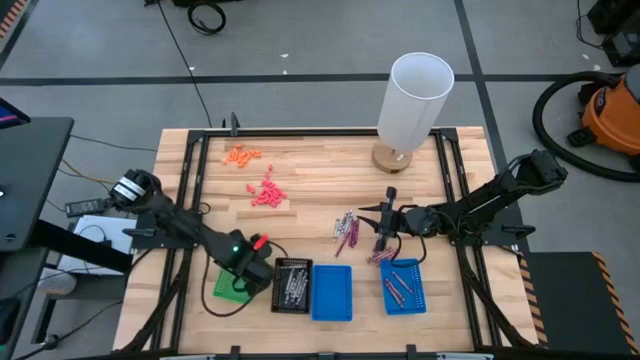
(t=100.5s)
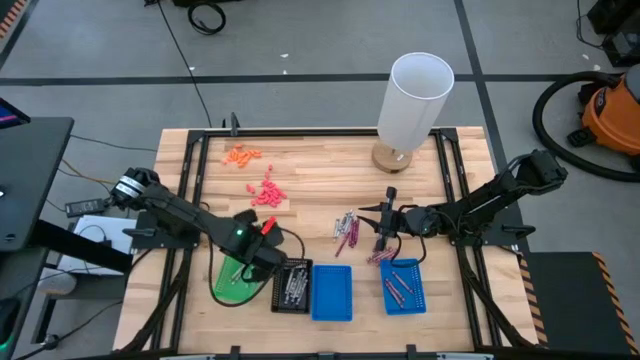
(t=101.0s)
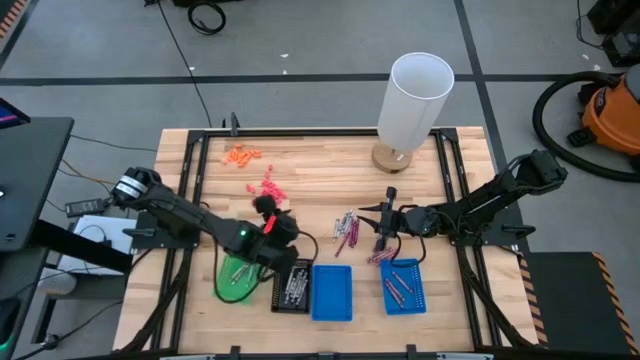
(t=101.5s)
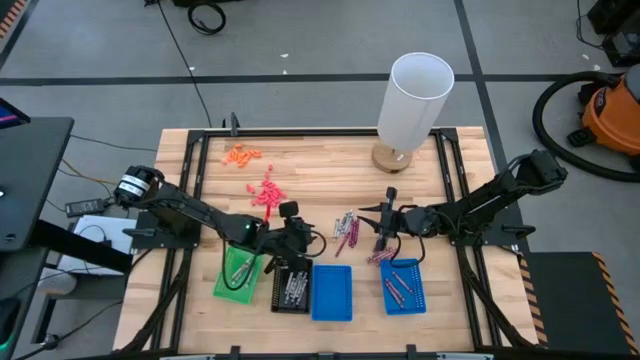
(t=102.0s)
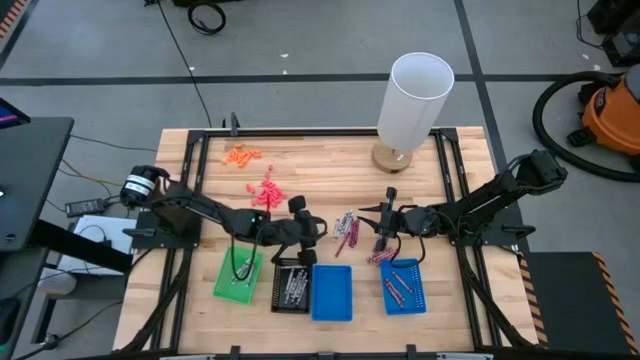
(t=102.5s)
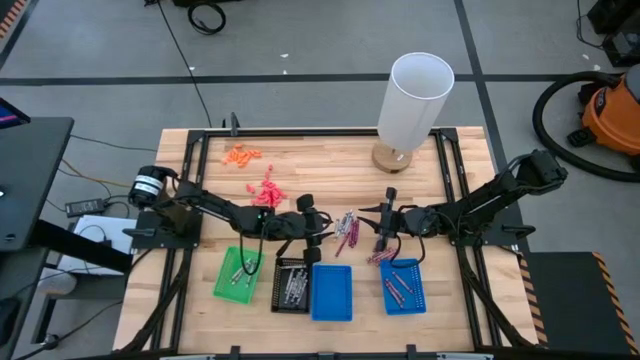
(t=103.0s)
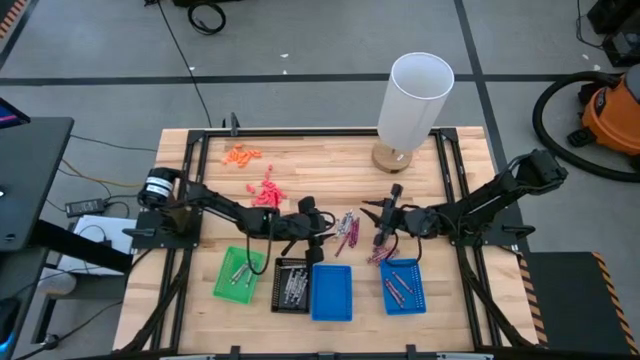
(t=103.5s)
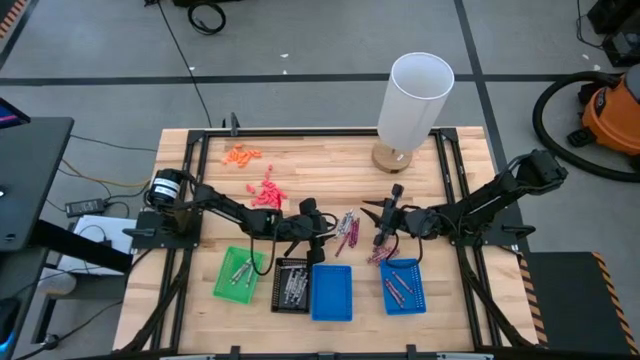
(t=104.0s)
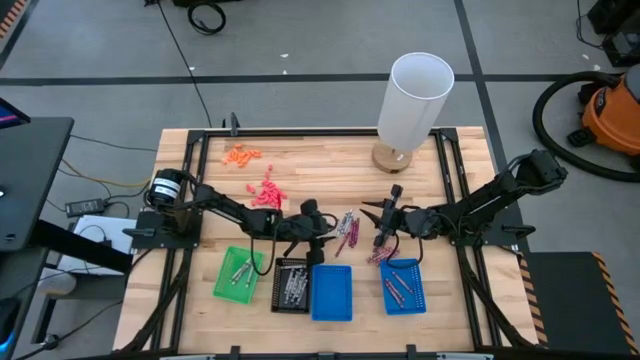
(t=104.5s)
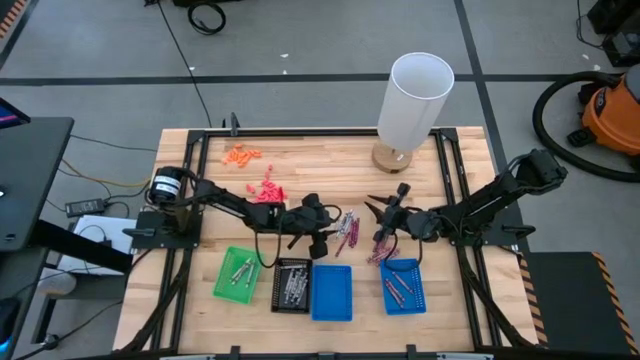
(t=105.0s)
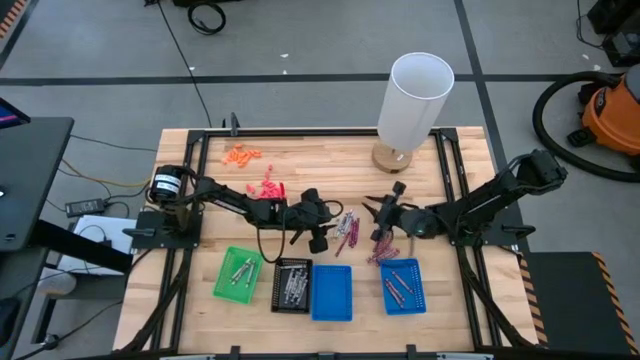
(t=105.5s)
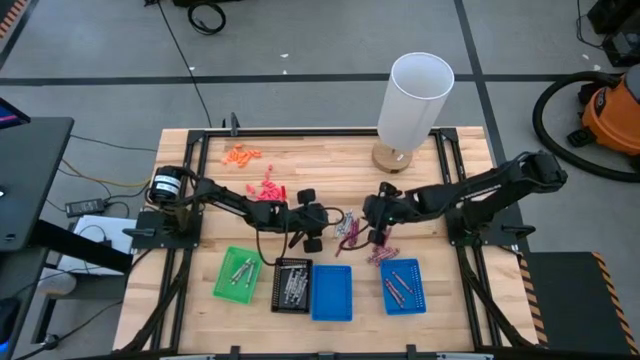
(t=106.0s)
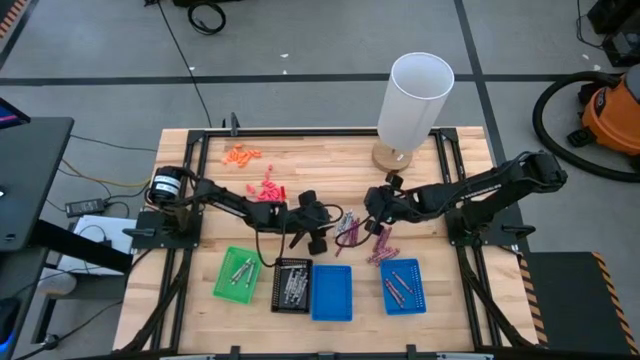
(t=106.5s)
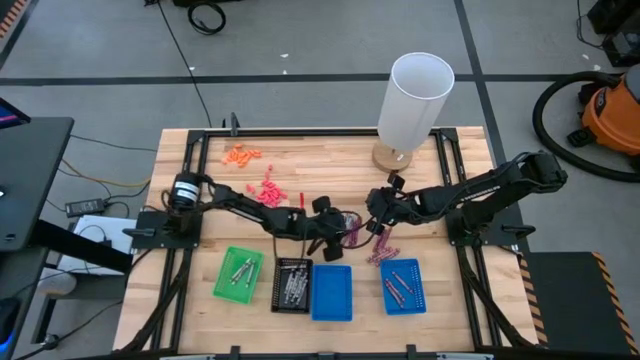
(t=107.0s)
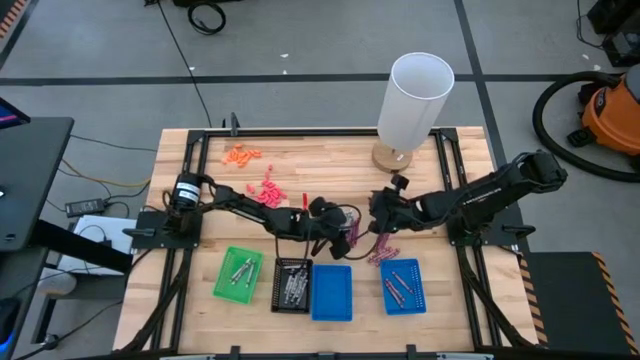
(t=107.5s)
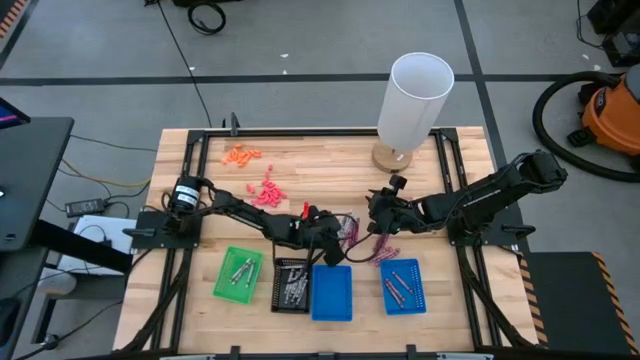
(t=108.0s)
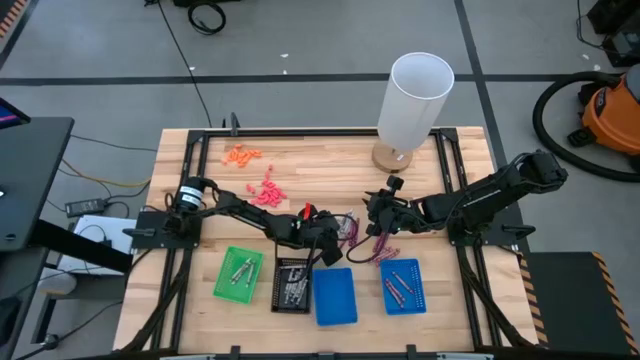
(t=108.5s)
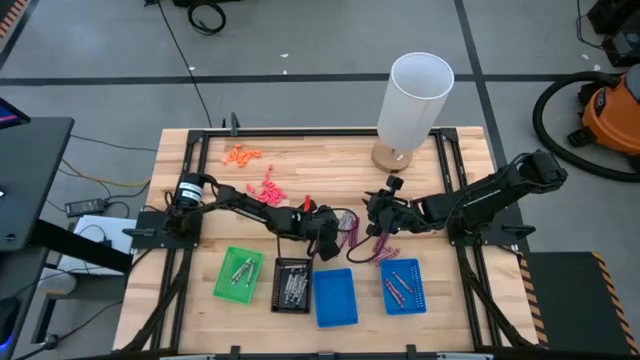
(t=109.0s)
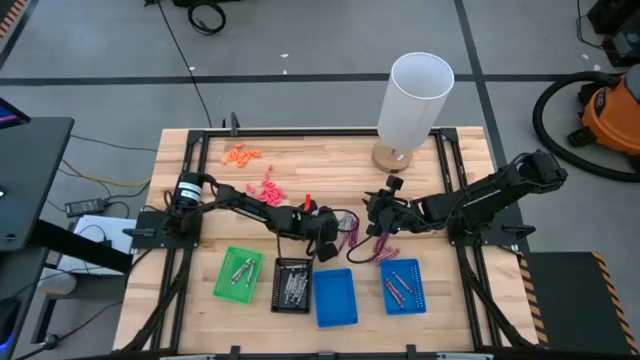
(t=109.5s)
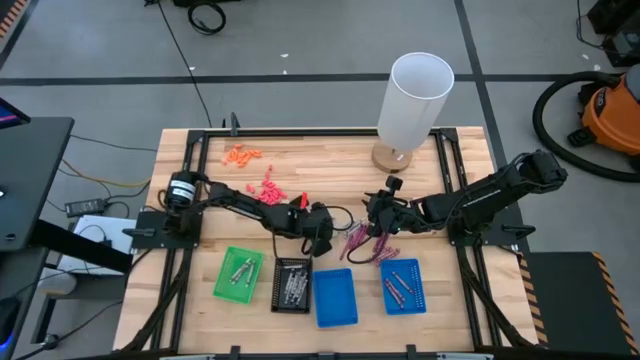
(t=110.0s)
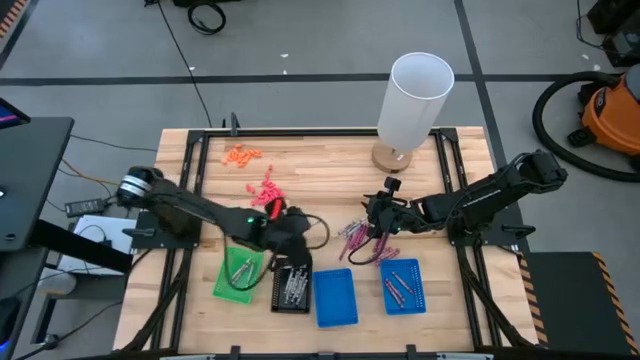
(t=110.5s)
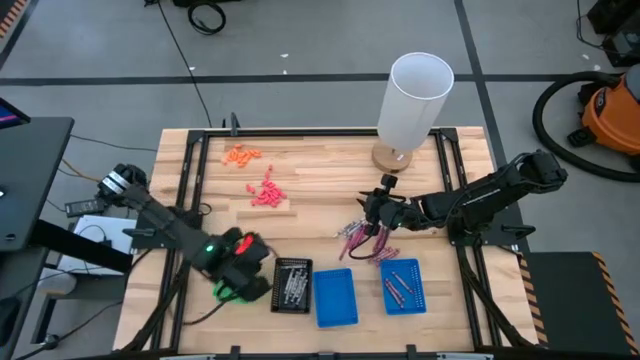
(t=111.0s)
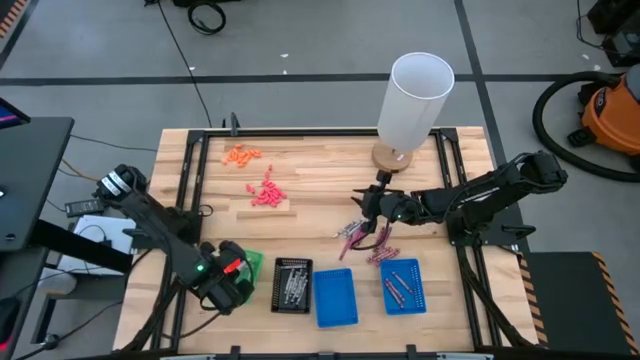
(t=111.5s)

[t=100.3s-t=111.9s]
Task: Sort crayons
Put the white crayon into the green bin

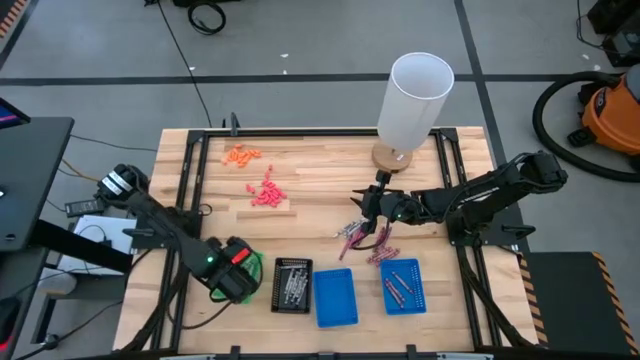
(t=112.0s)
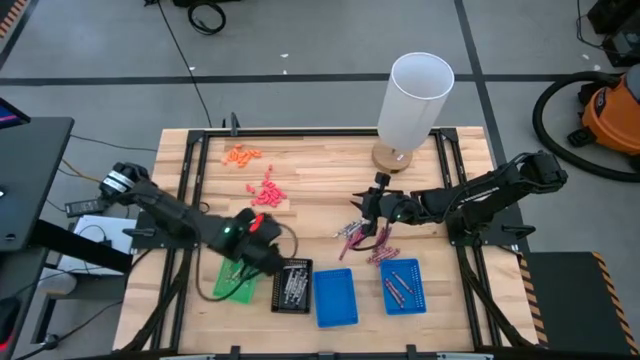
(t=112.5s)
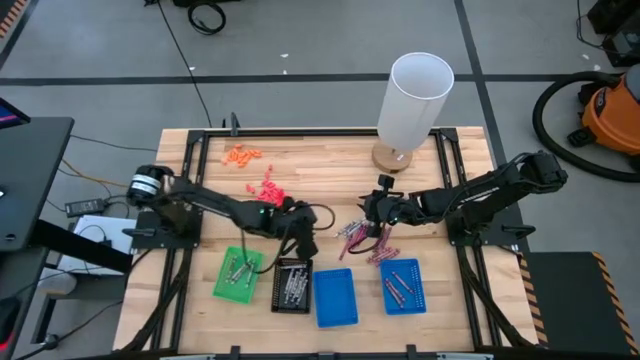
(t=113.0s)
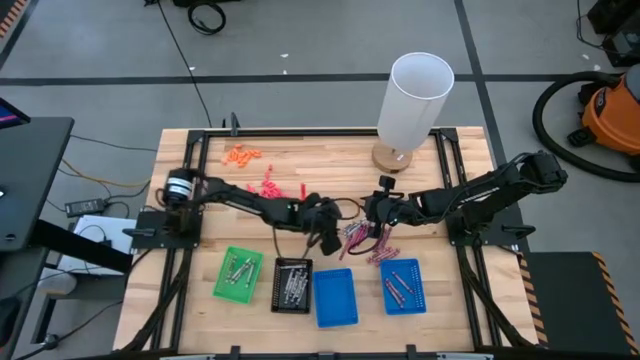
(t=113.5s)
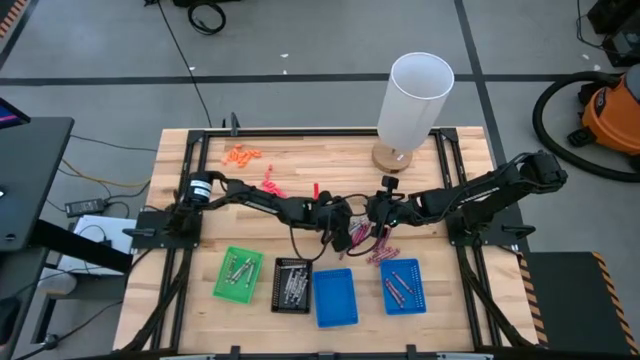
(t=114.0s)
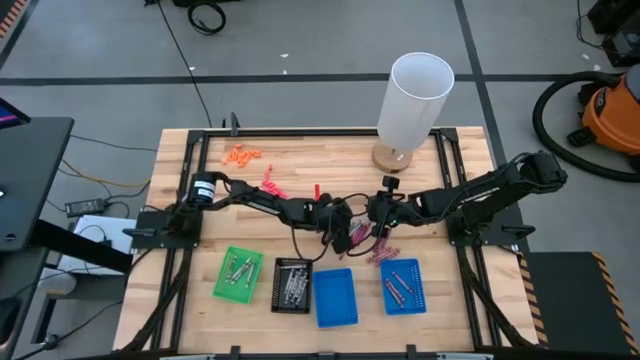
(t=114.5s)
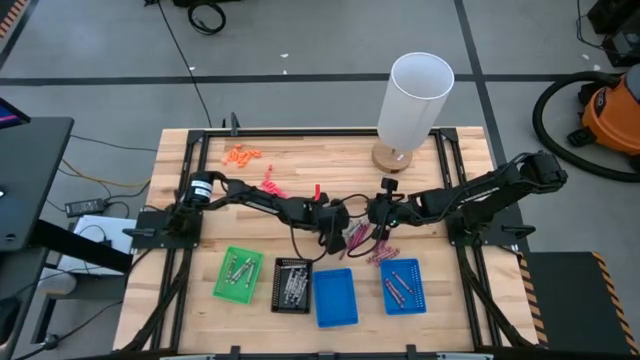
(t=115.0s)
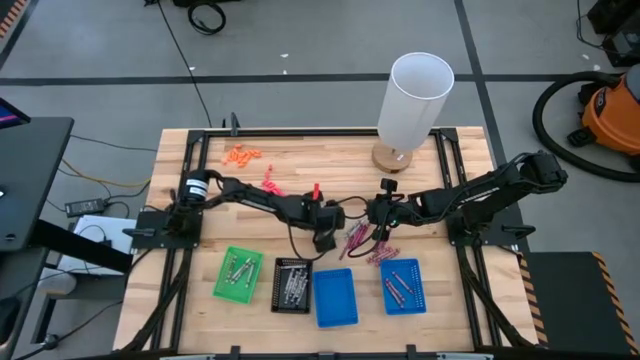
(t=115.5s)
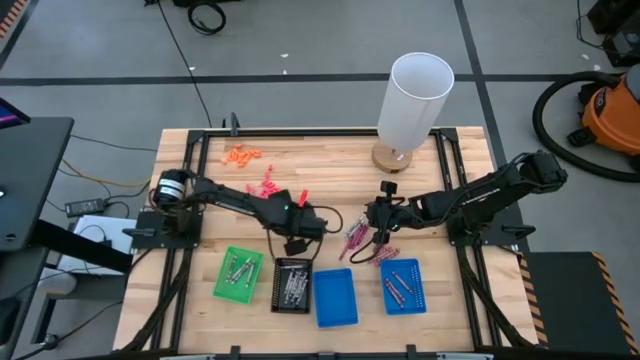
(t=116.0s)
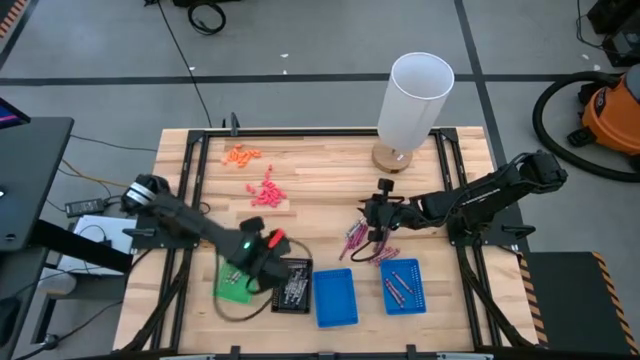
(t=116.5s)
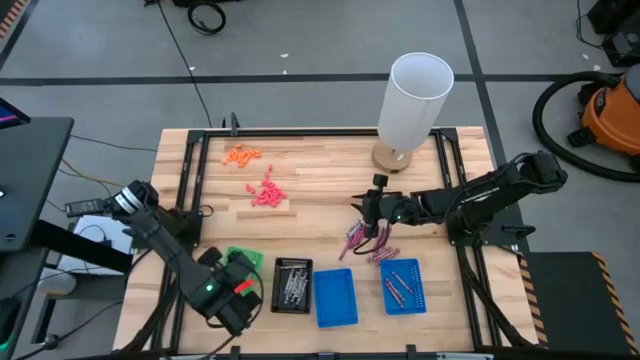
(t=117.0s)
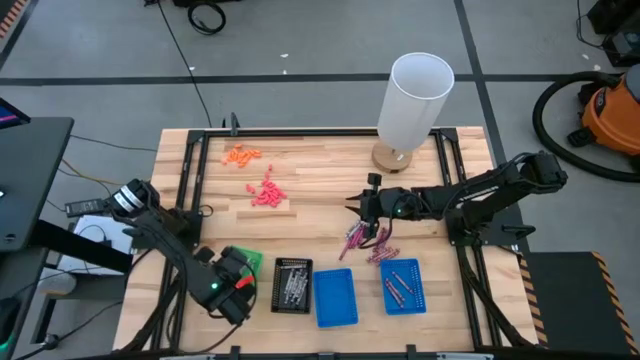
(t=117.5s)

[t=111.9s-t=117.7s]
Put the white crayon into the green bin

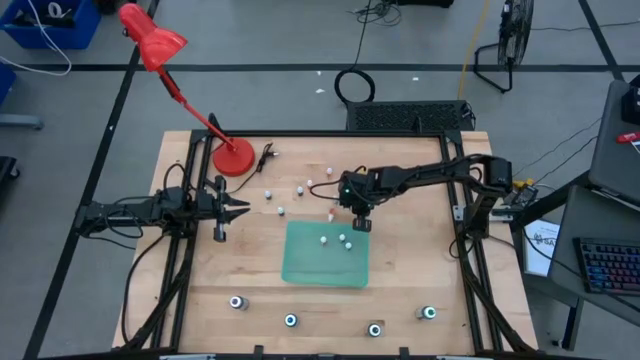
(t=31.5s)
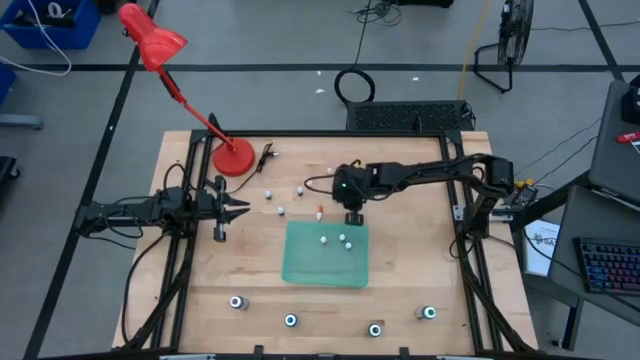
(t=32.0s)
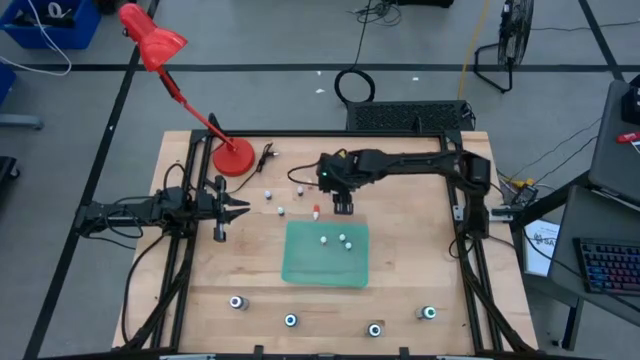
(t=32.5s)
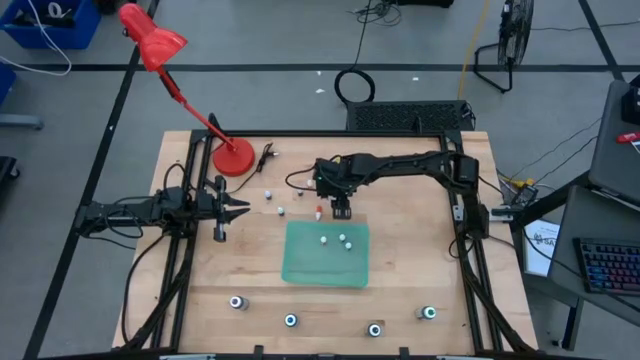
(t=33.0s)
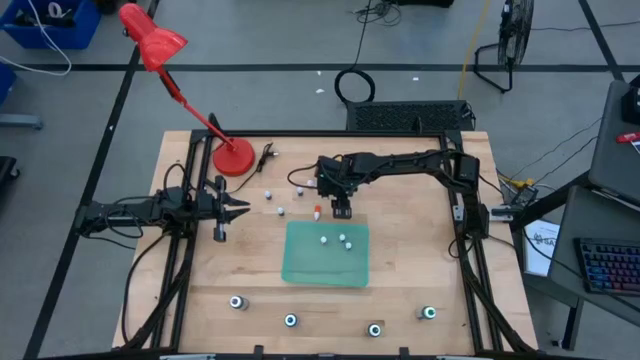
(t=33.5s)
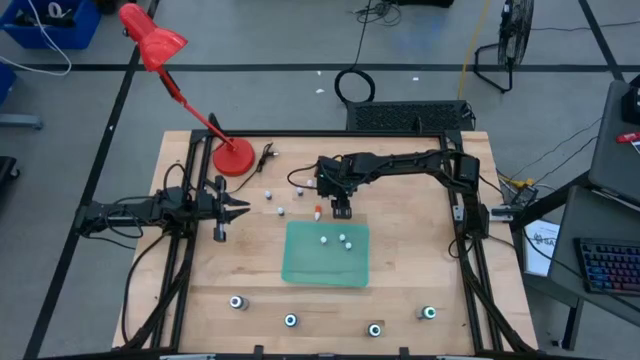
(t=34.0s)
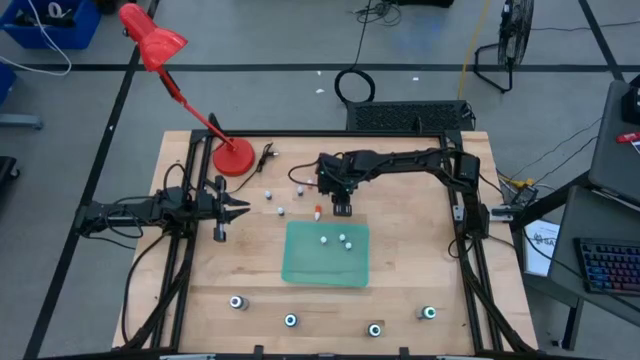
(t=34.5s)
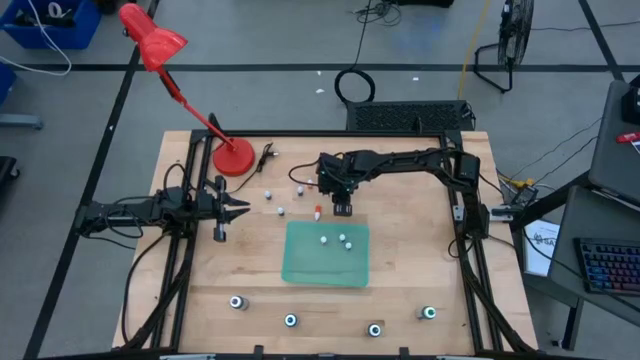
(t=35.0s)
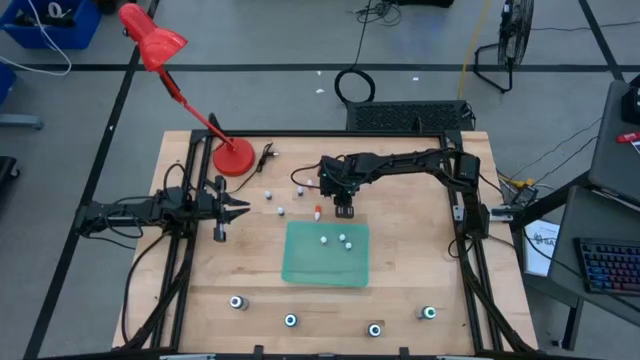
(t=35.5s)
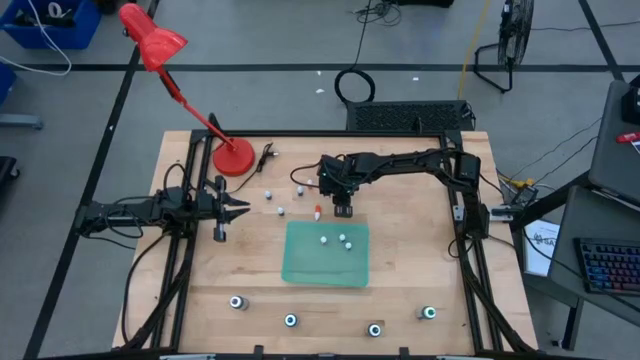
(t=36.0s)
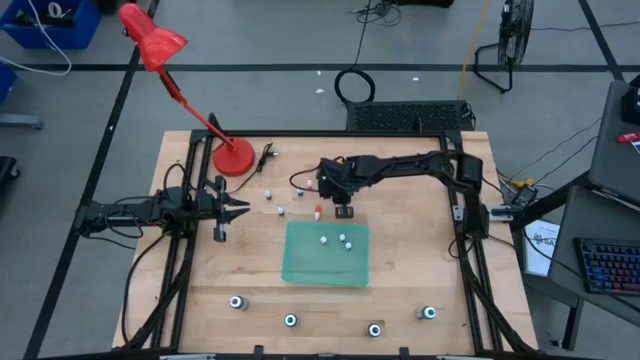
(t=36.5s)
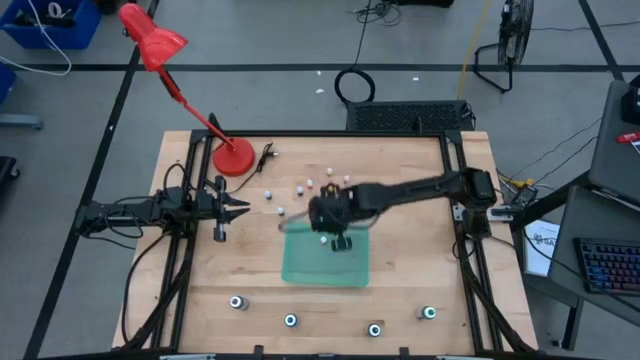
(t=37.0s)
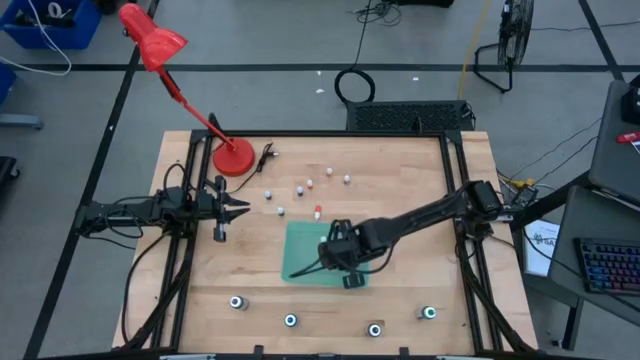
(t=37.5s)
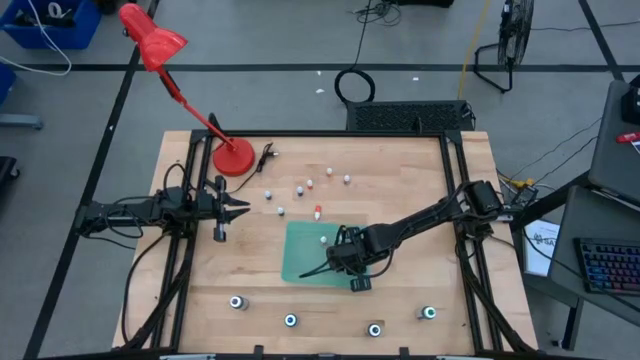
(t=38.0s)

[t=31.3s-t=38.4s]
Task: Pick & Place food coloring
Put the small green food coloring bottle into the green bin
